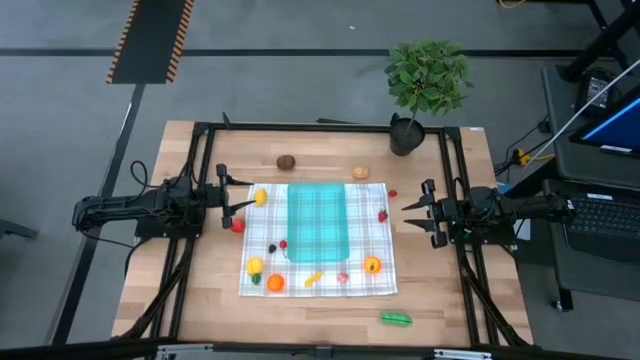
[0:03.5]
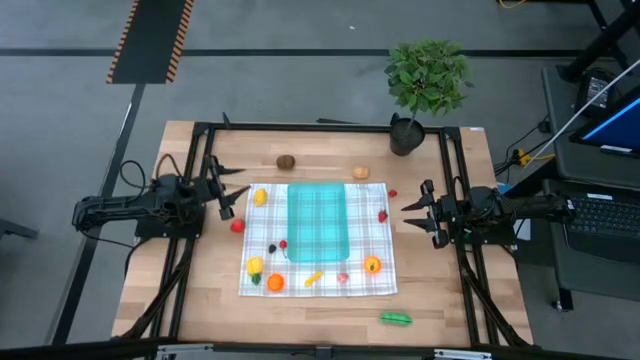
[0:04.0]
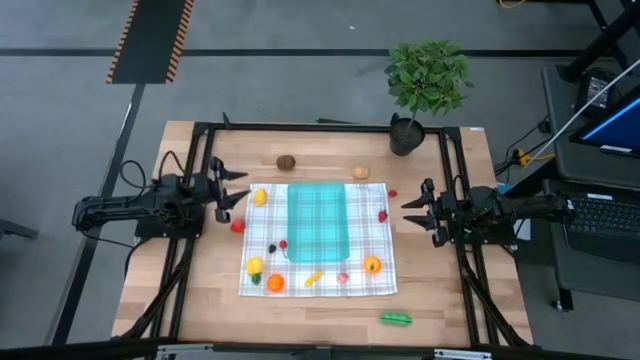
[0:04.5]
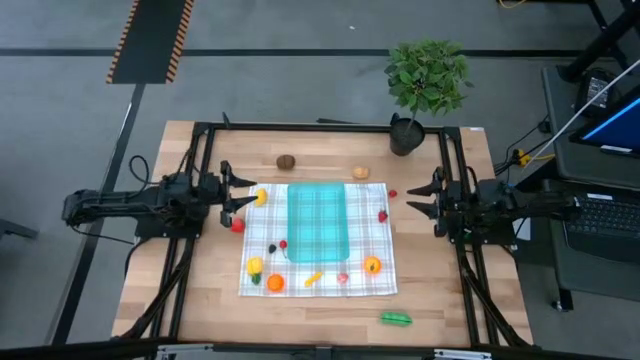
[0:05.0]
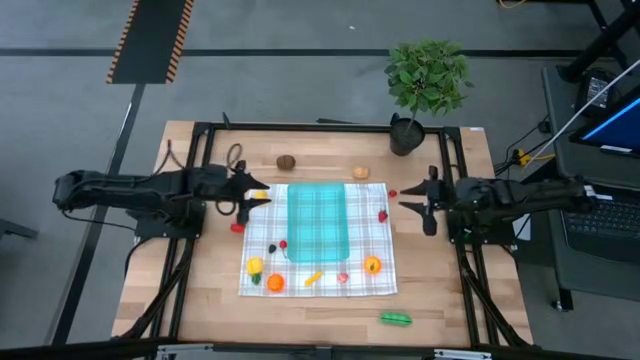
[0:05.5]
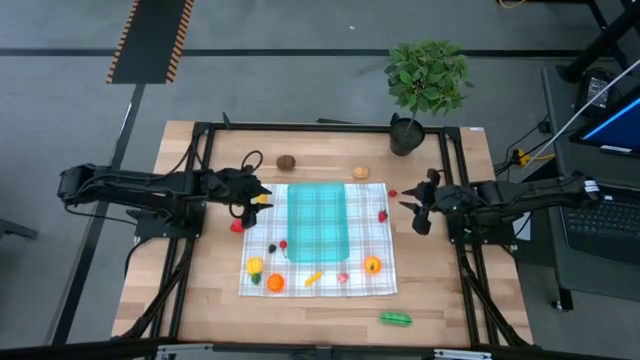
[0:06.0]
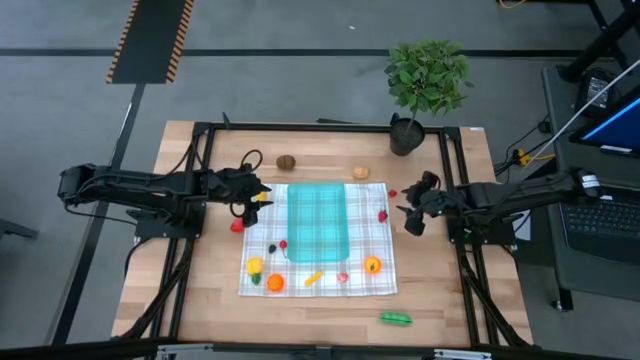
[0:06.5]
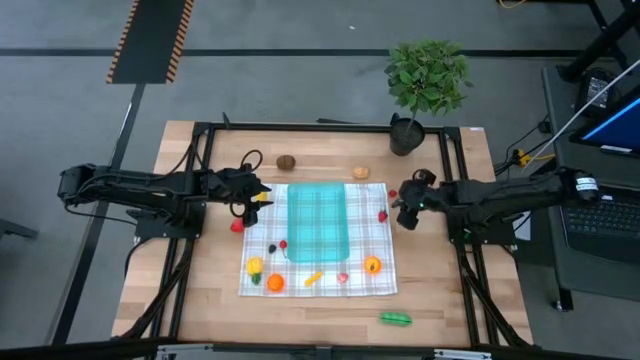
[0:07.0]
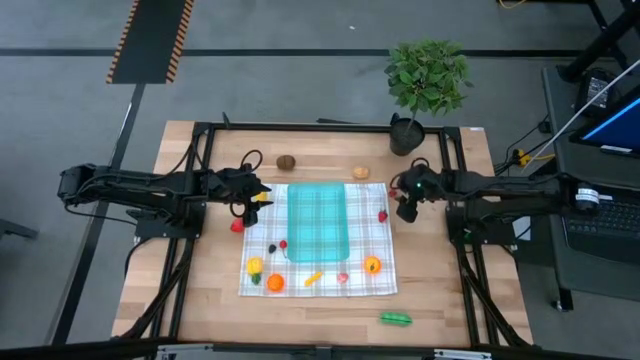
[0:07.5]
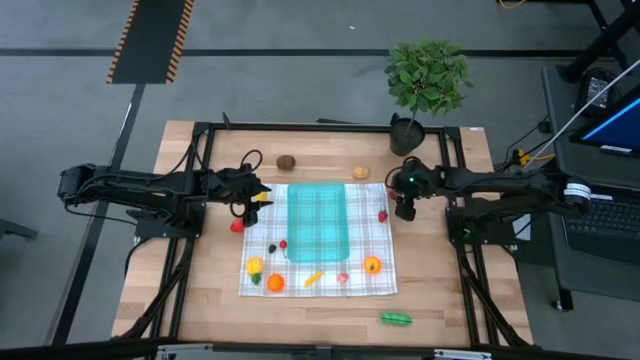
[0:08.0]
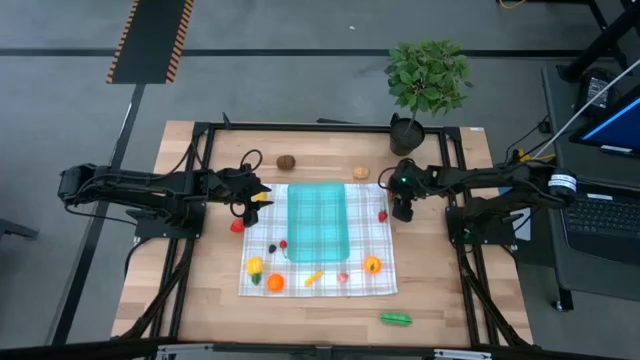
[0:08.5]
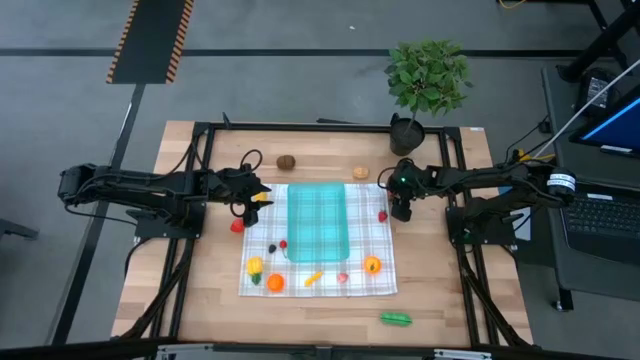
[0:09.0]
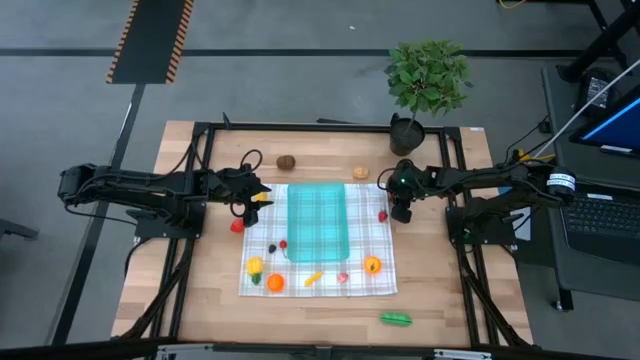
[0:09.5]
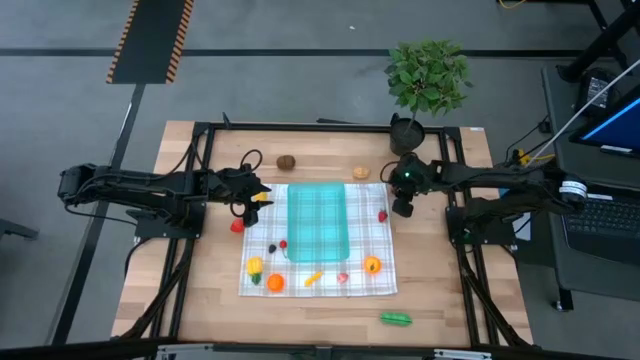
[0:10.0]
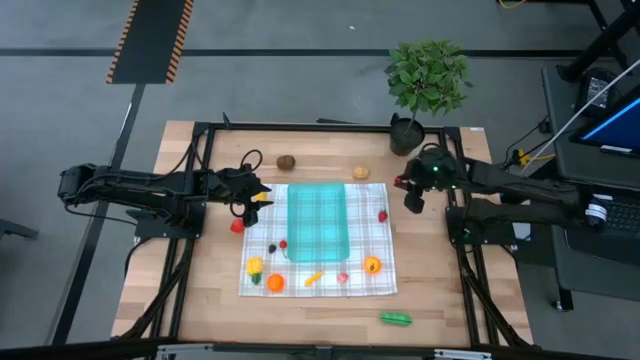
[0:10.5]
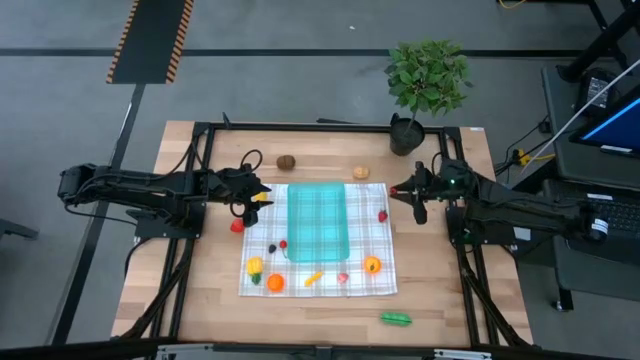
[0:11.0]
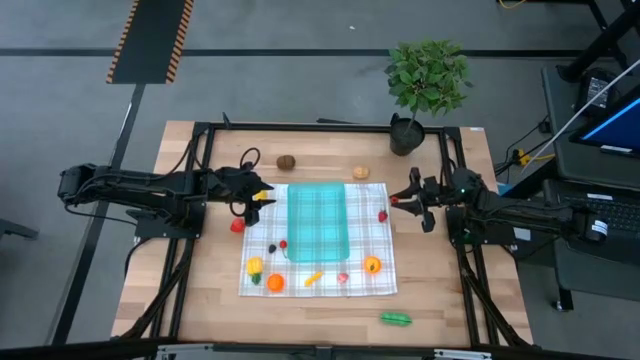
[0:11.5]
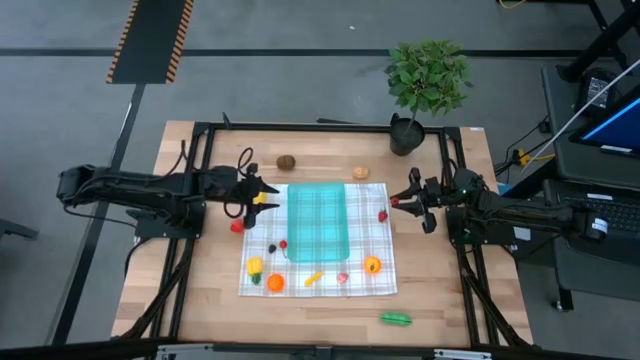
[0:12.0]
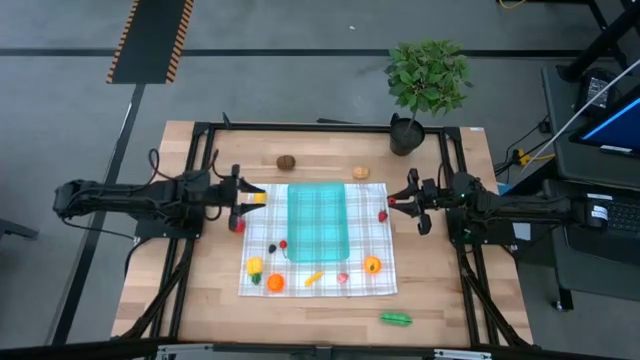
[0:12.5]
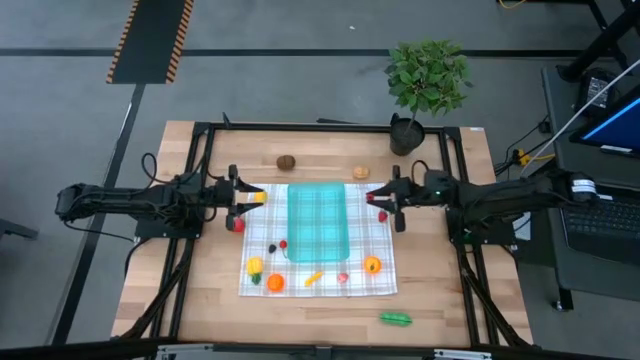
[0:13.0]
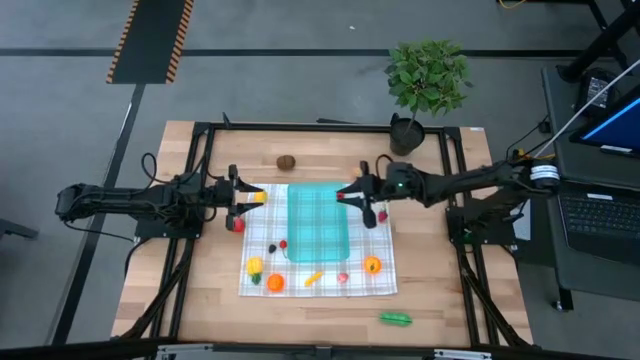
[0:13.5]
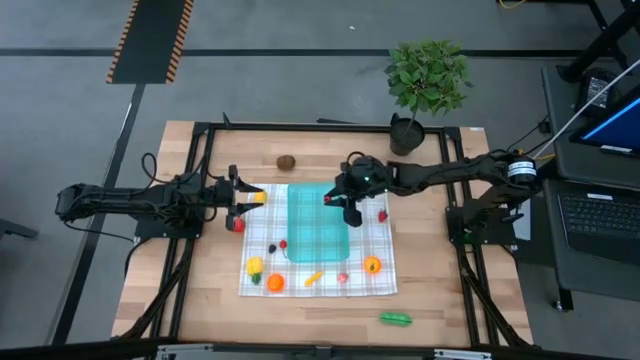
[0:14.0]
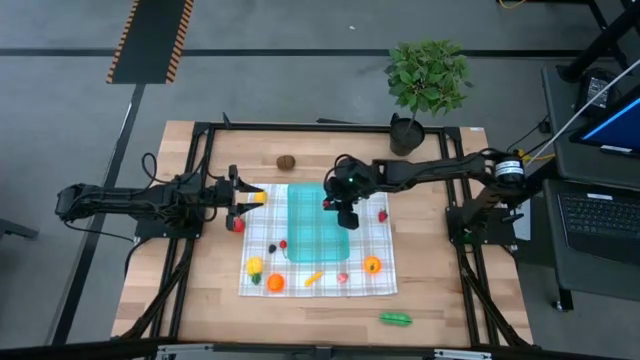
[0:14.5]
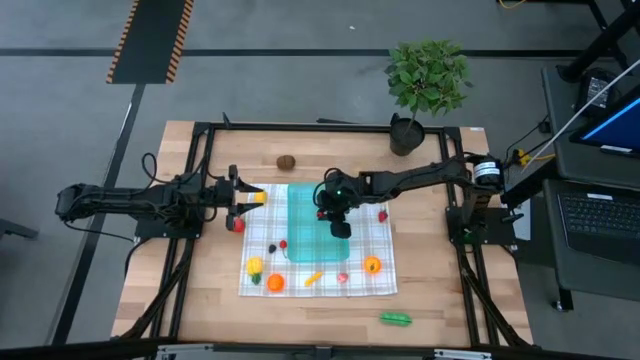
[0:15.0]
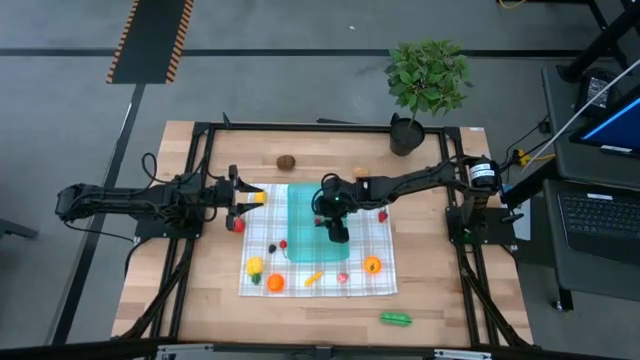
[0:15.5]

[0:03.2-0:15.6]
Task: Pick and placing Produce into tupperware
Put the red raspberry into the blue bin

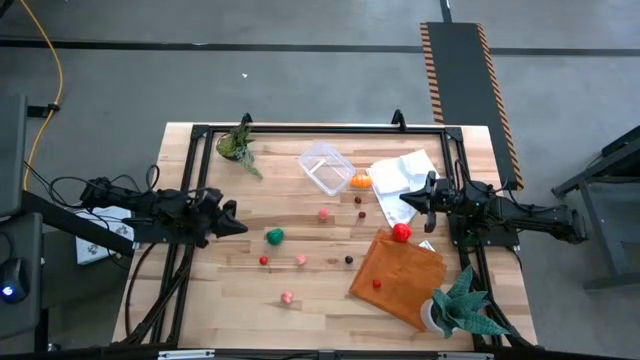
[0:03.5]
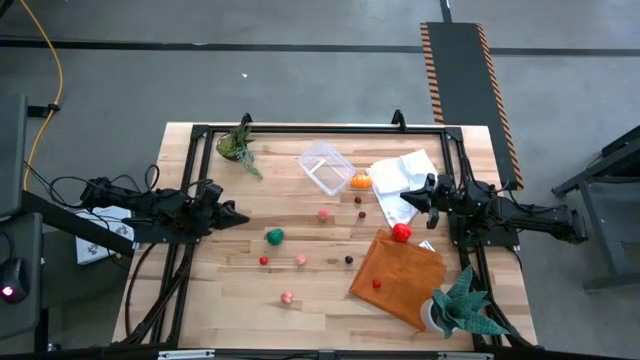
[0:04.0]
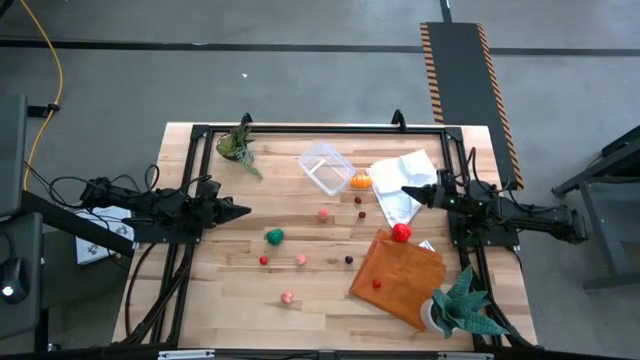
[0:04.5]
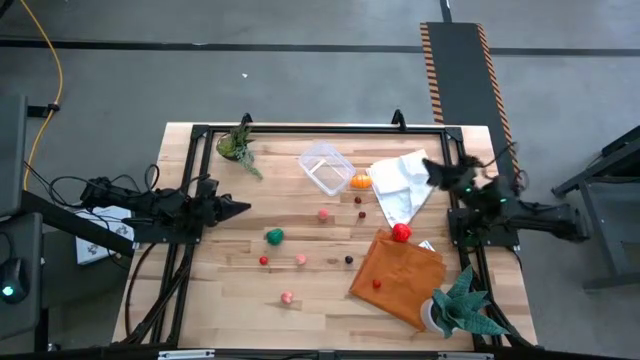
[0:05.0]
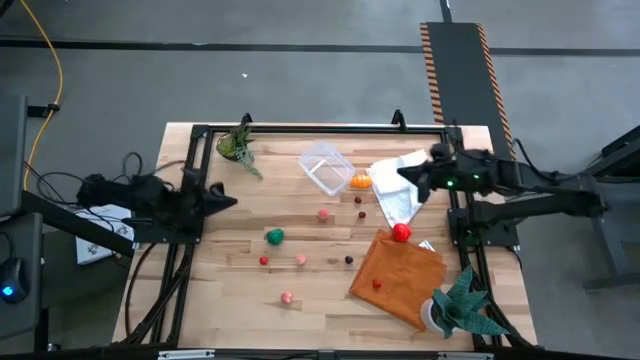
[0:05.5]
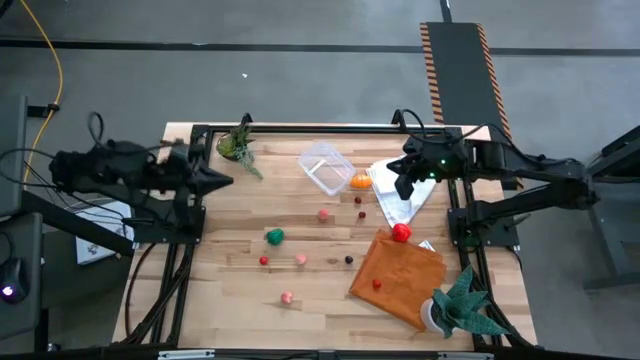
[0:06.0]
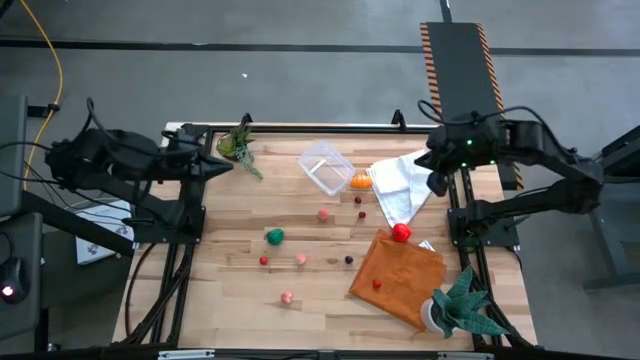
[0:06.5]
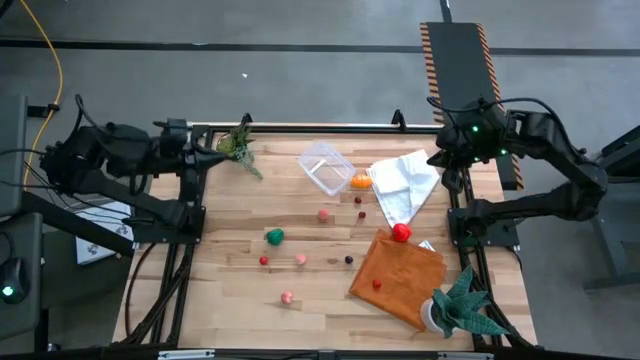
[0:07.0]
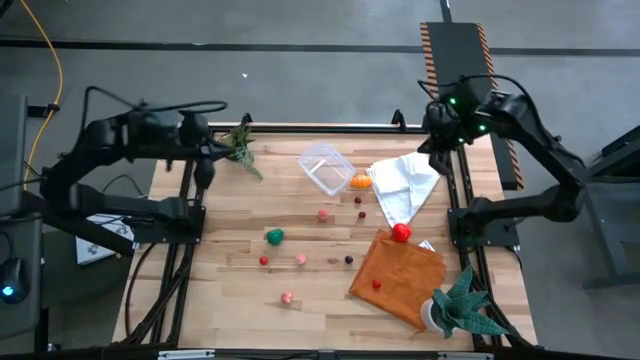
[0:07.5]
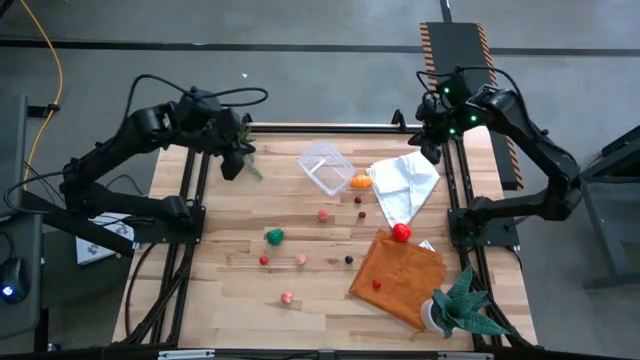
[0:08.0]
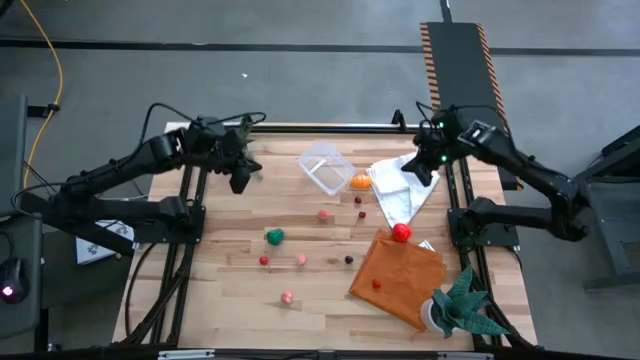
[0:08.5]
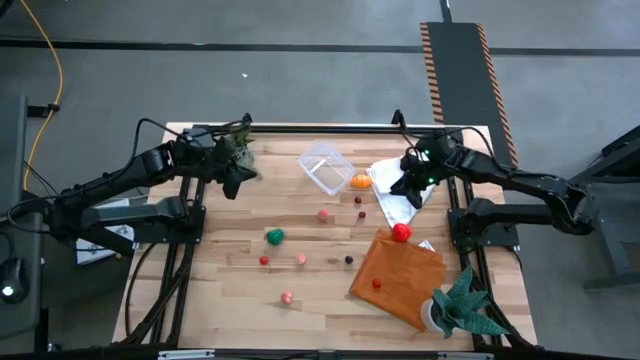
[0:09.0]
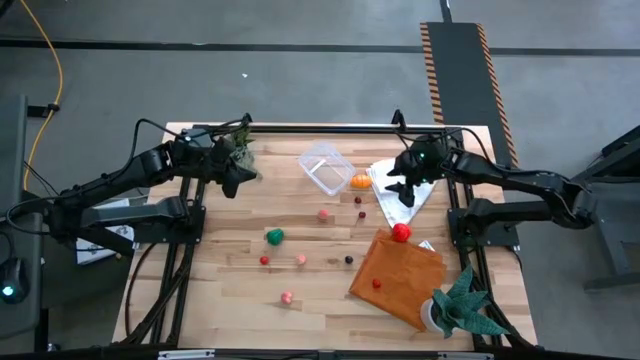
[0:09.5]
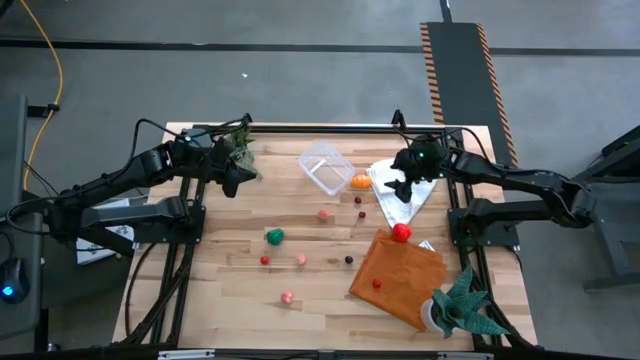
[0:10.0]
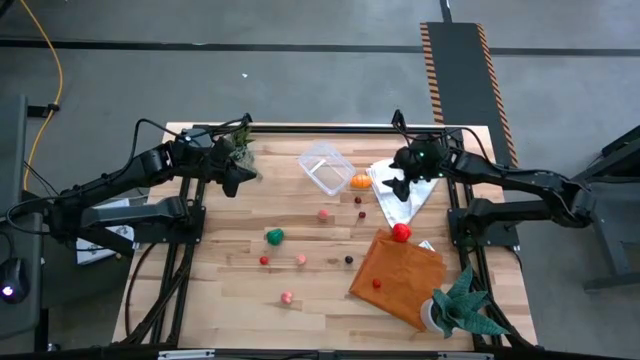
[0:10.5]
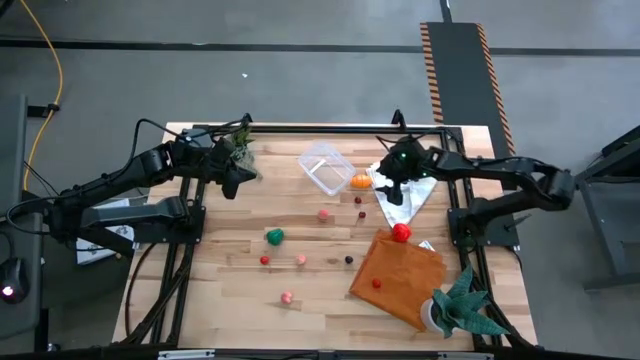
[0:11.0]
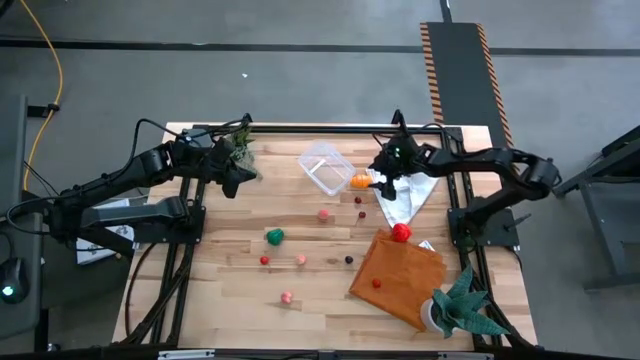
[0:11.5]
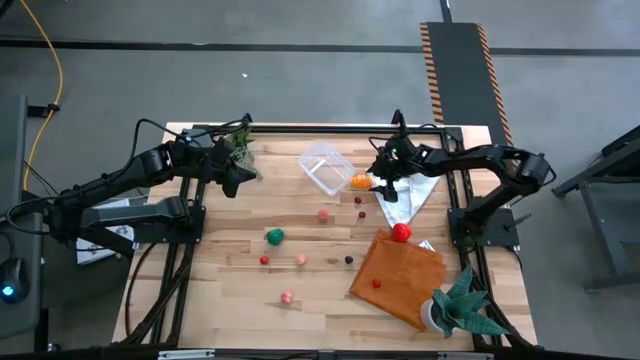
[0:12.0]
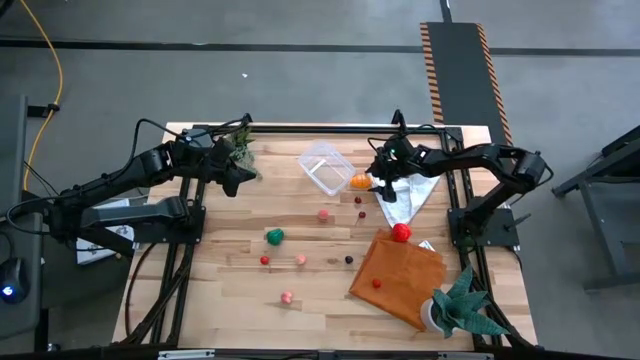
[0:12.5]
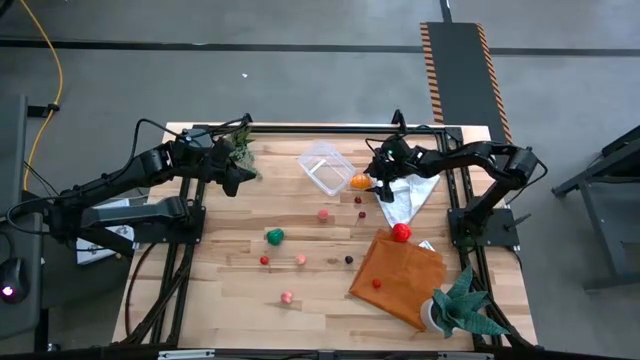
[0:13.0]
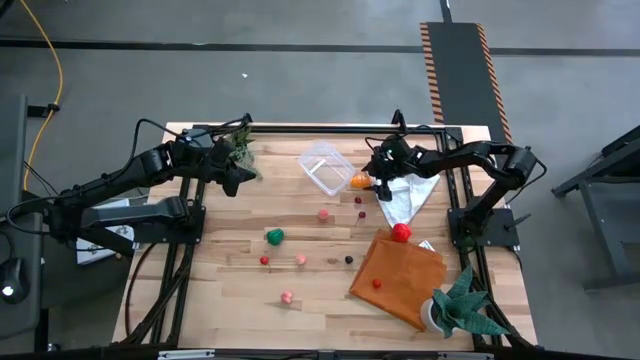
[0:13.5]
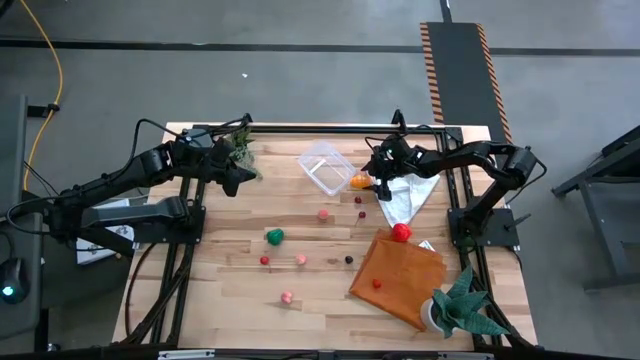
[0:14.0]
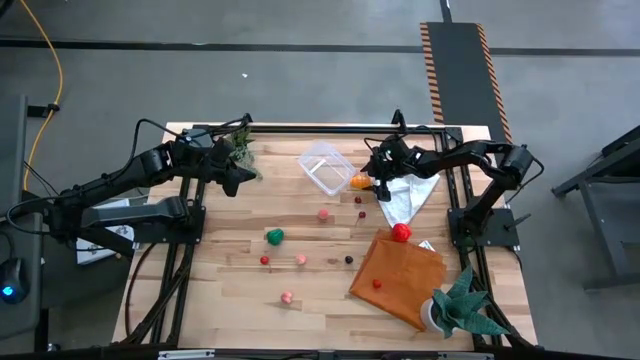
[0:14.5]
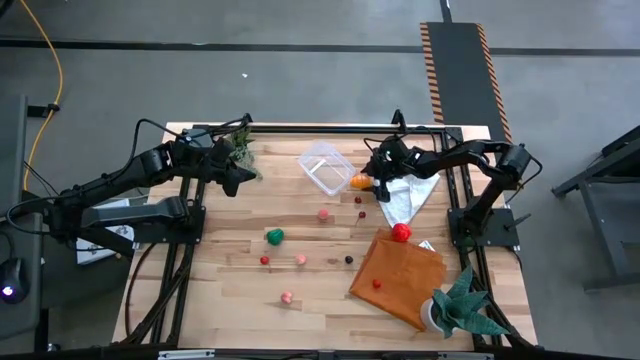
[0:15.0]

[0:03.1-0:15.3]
Task: Pick and placing Produce into tupperware
Put the brown croissant into the transparent bin
